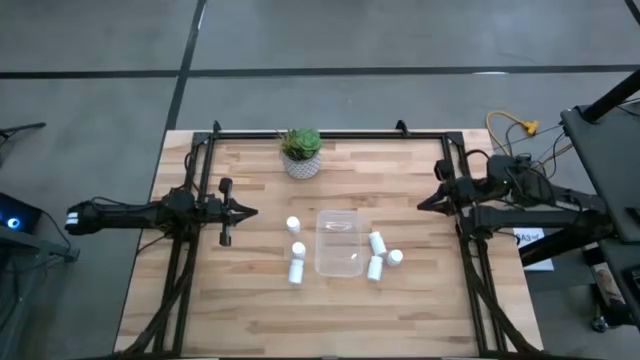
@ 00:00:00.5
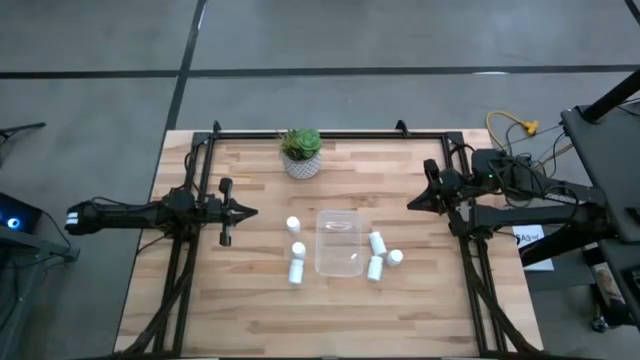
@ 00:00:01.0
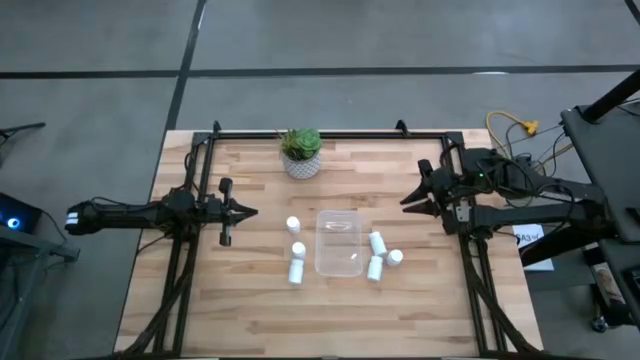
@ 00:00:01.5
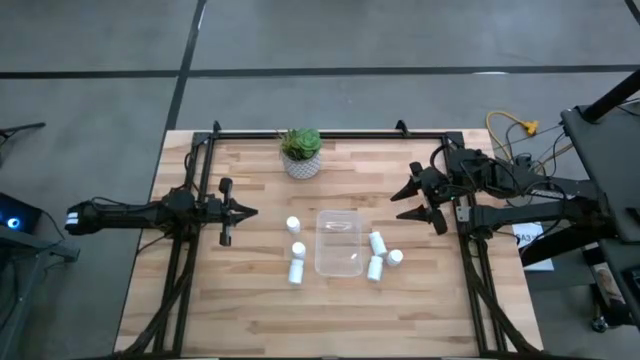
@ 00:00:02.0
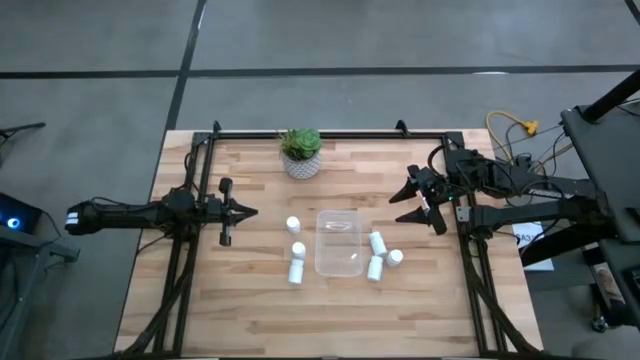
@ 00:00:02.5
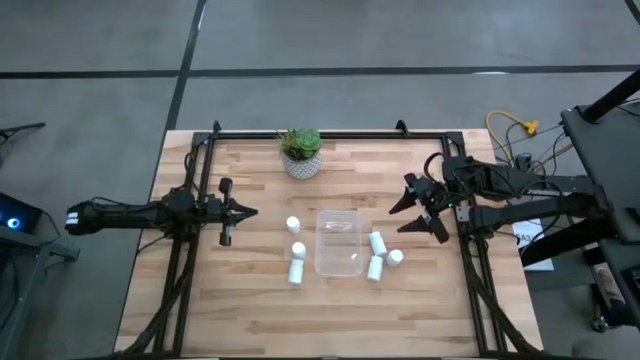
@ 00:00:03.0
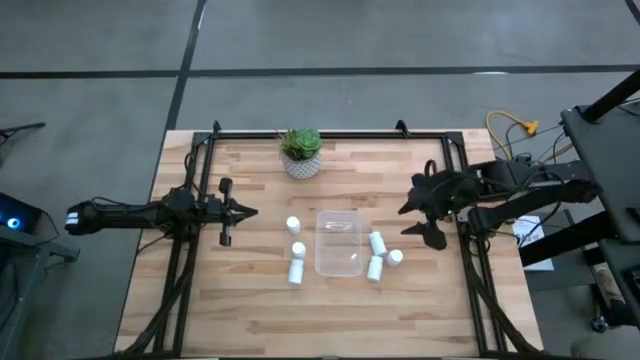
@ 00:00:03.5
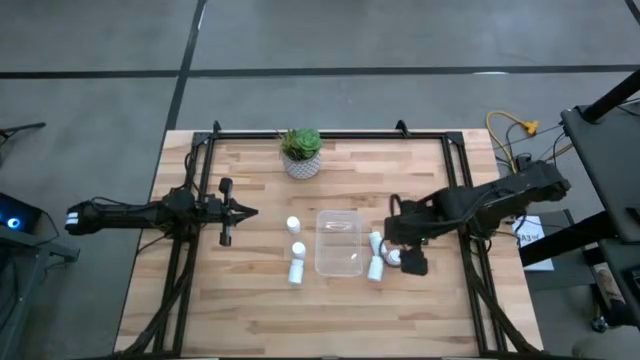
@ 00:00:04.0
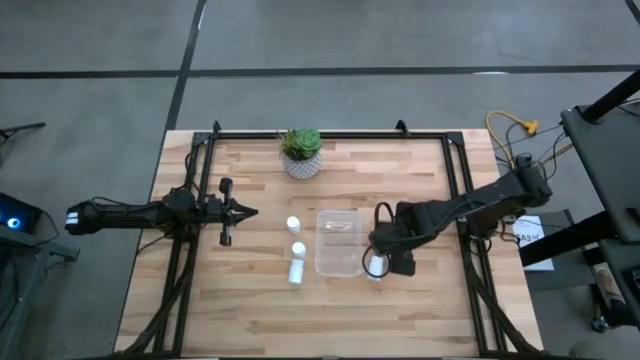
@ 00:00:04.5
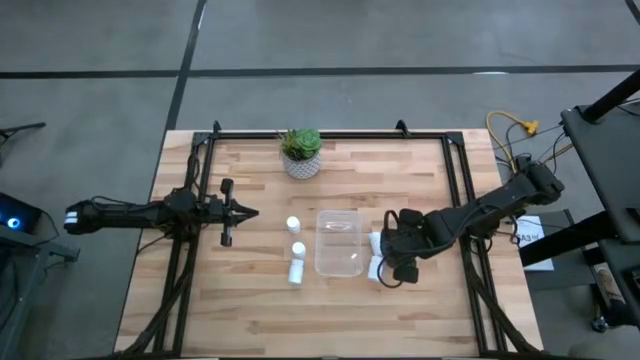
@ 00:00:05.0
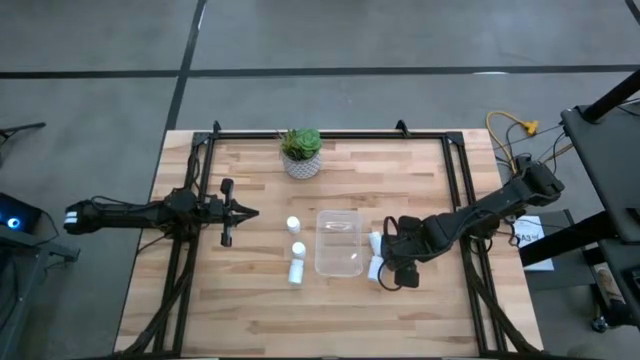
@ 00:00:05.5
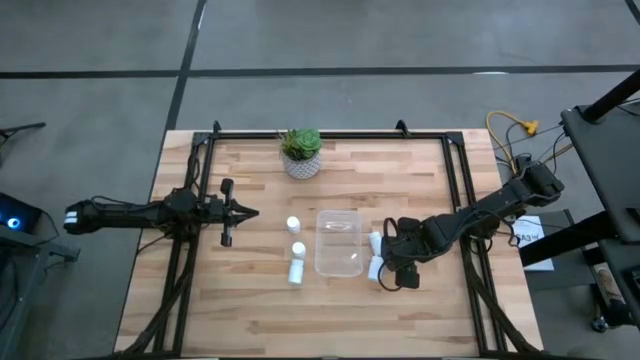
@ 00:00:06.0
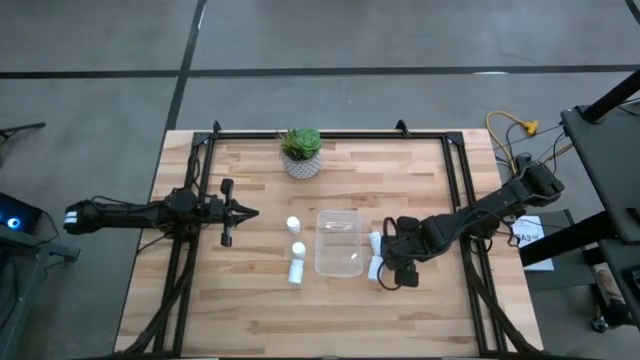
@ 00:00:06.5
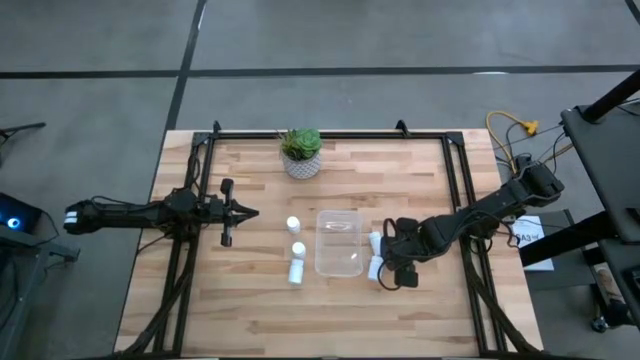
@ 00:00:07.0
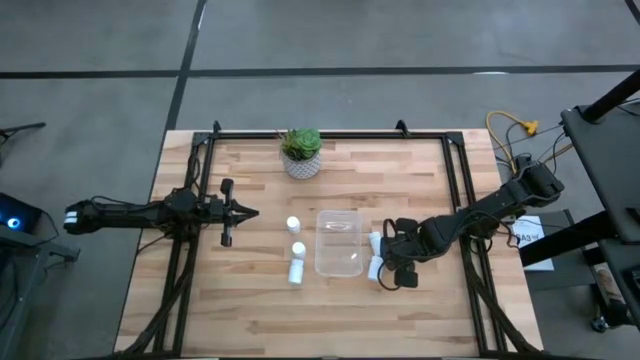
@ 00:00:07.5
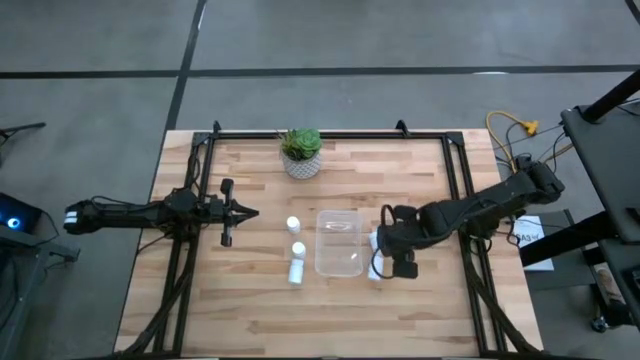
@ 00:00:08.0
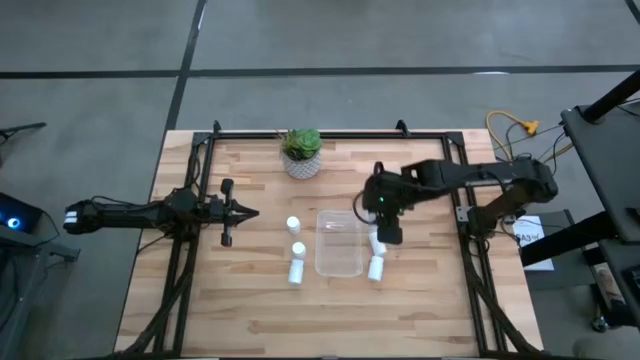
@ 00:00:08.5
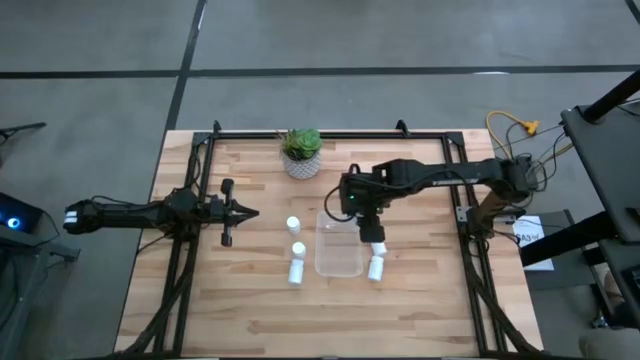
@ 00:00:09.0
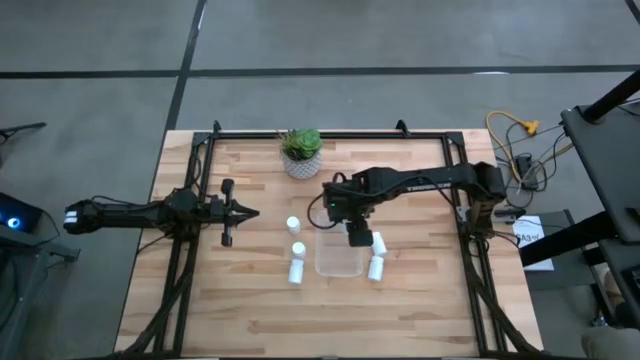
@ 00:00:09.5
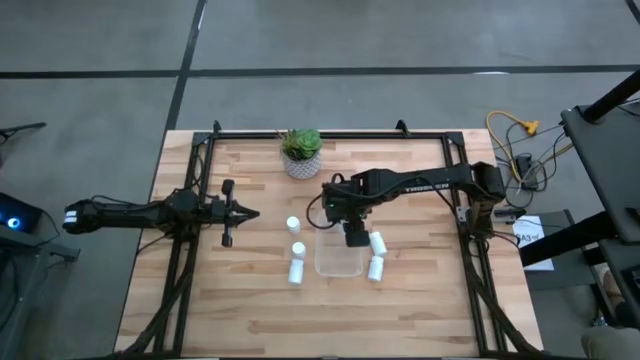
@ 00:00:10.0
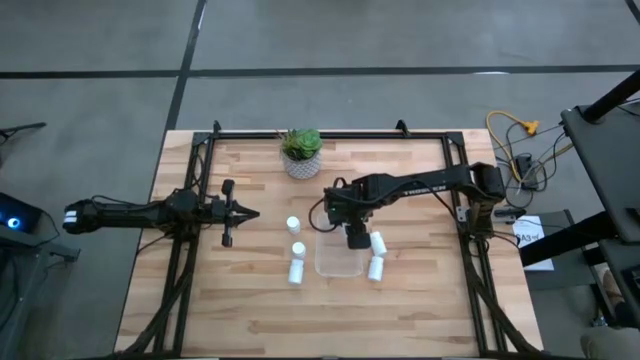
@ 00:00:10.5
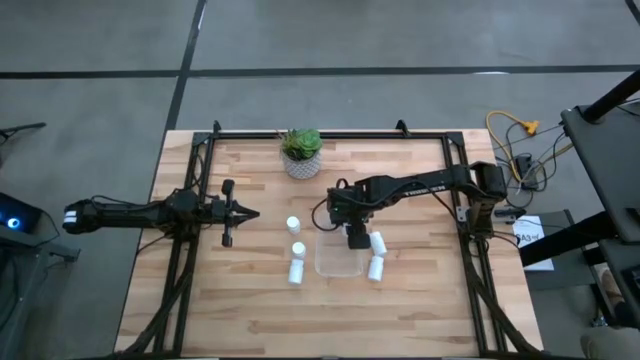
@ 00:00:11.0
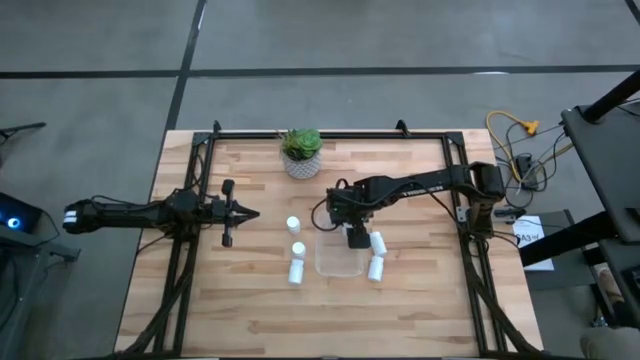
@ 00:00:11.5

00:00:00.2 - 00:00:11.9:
Task: Pick and place pill bottles into a basket
Put the white medicine bottle into the transparent bin

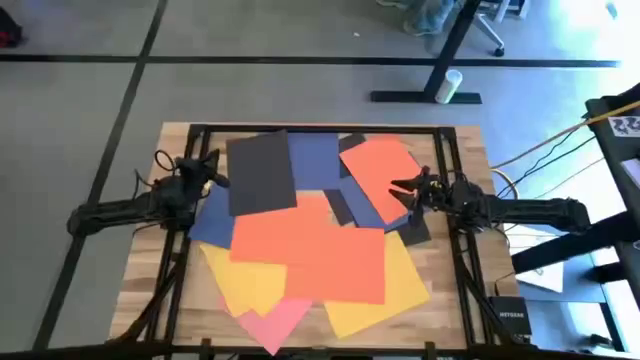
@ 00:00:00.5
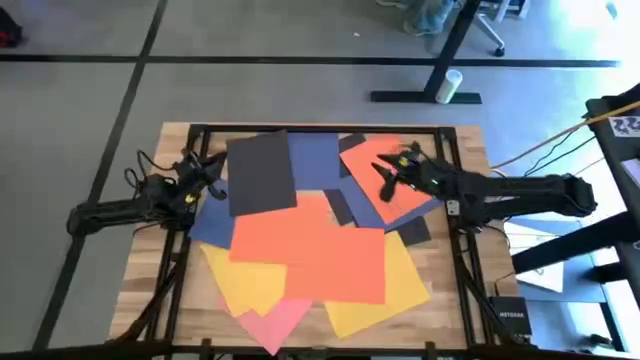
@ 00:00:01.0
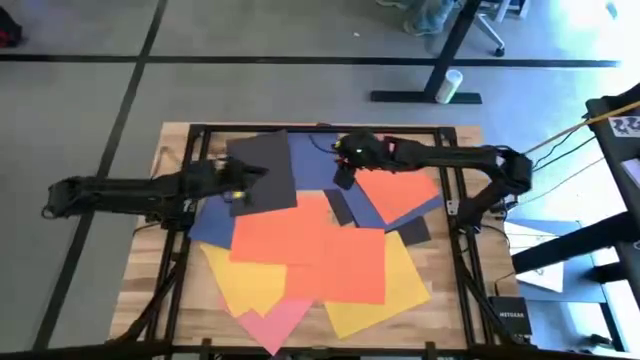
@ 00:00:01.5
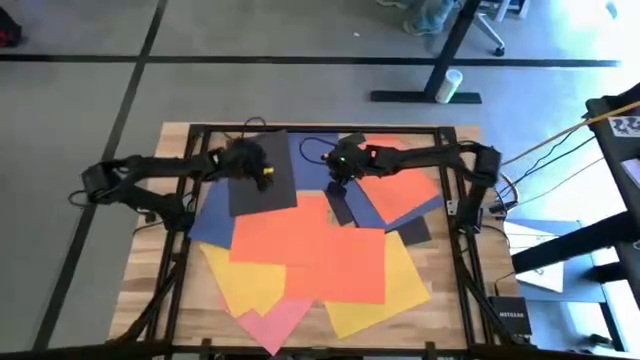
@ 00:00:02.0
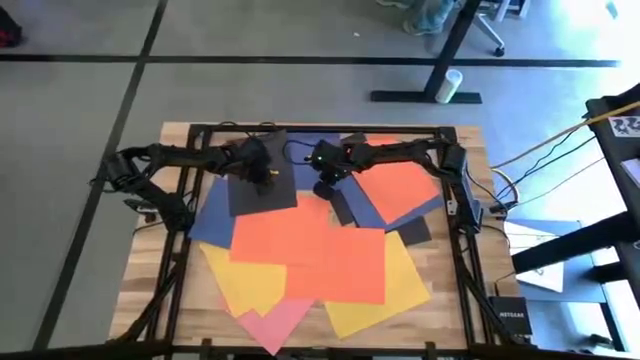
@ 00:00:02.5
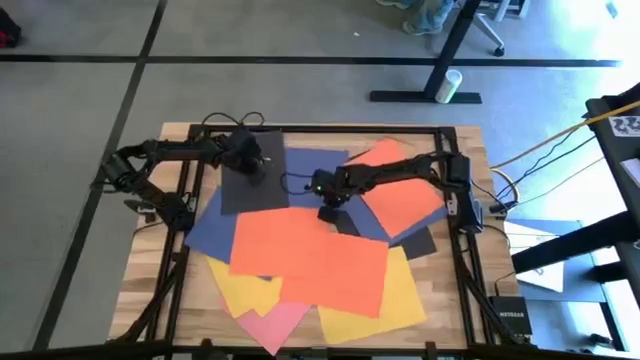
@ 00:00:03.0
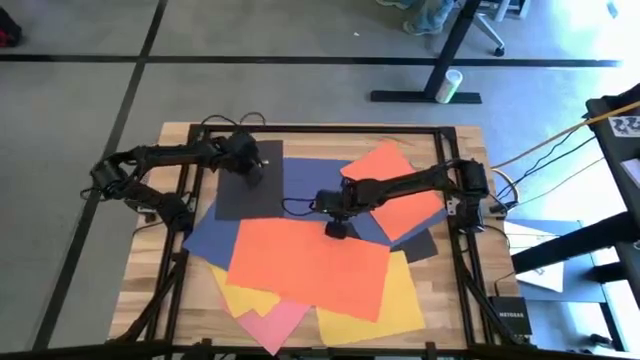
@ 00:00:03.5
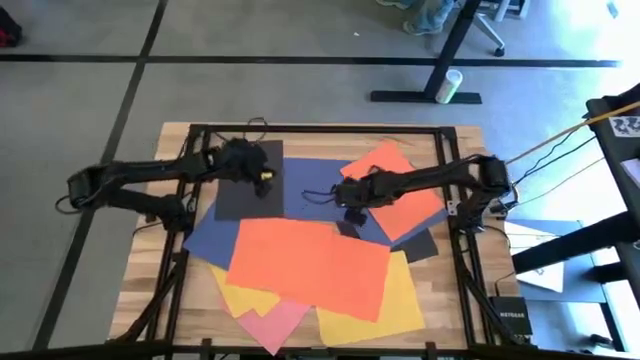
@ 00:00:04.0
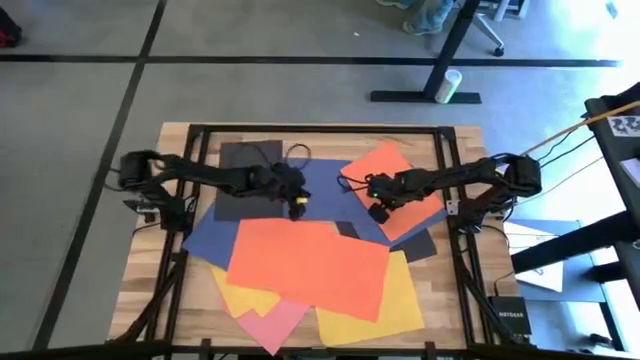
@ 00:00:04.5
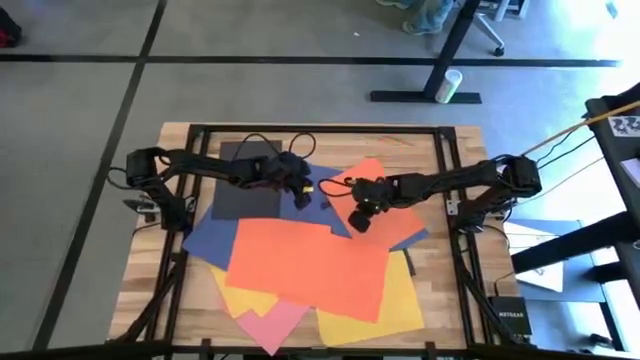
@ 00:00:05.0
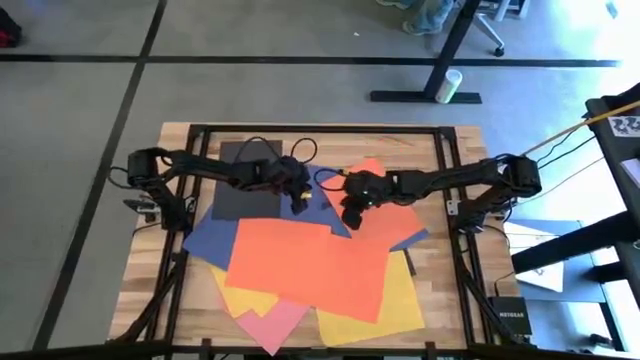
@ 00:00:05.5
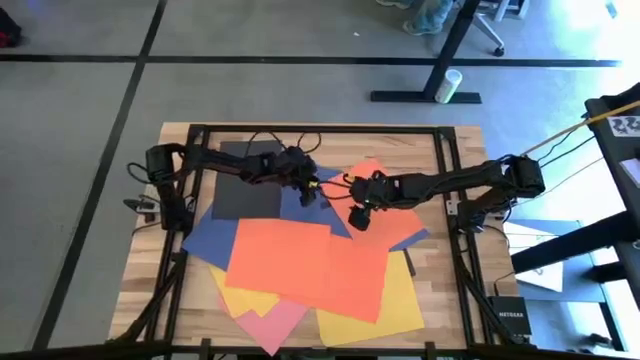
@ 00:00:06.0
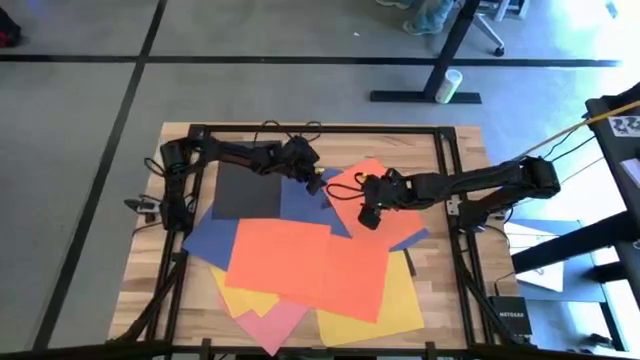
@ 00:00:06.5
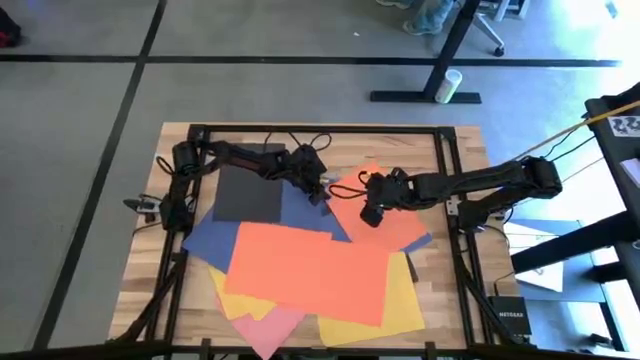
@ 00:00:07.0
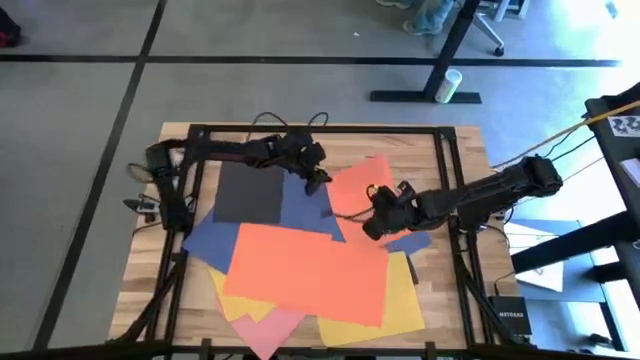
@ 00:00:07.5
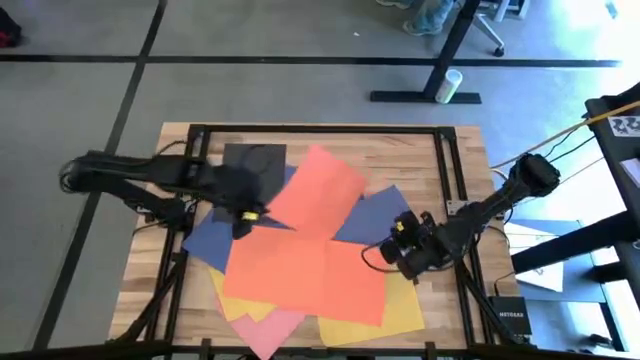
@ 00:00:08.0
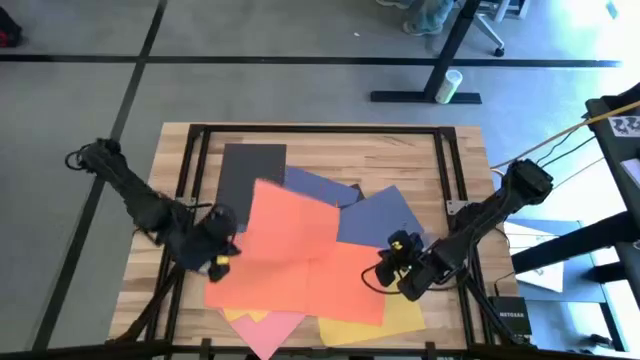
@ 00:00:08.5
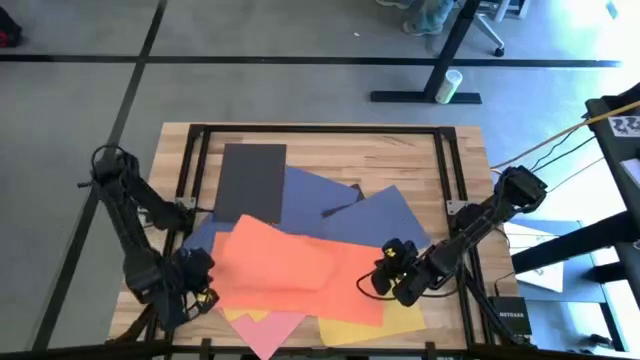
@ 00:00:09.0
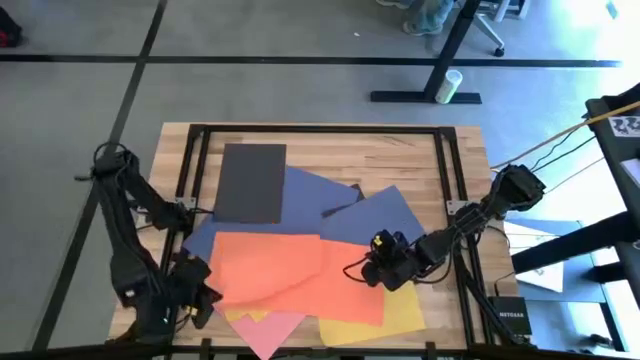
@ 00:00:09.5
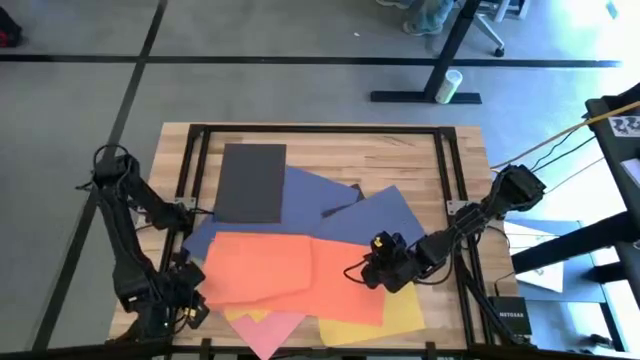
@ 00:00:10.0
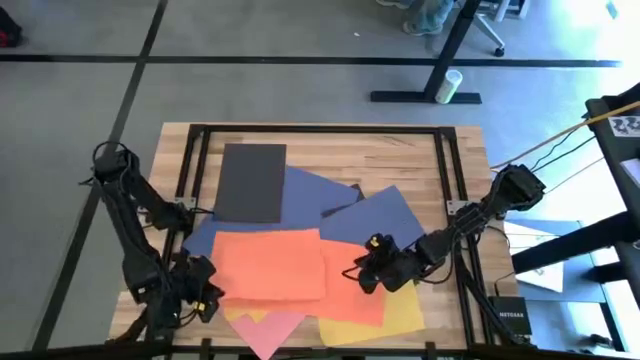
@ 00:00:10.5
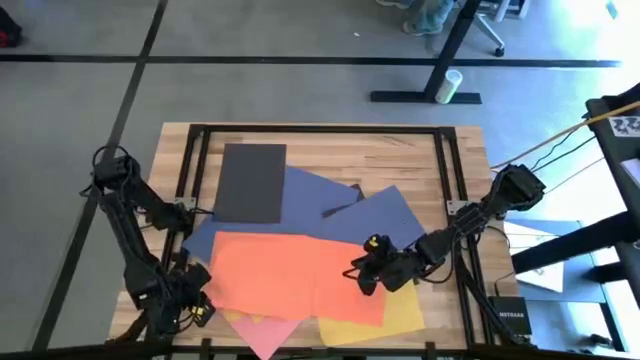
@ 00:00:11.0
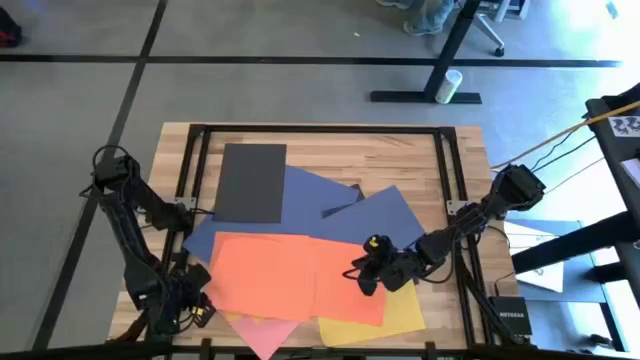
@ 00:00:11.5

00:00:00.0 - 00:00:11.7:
Task: Organize paper
Move the papers to the bottom of the table
